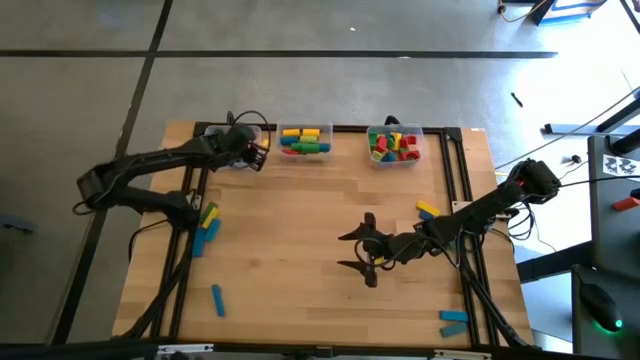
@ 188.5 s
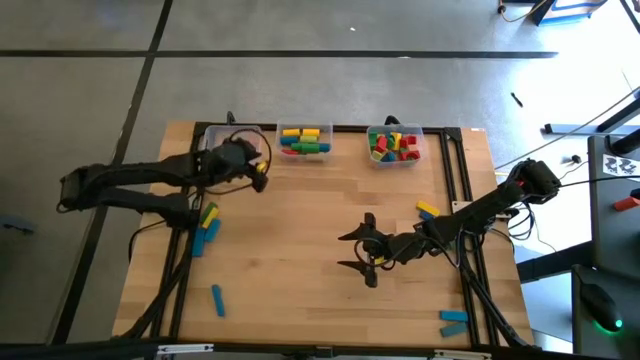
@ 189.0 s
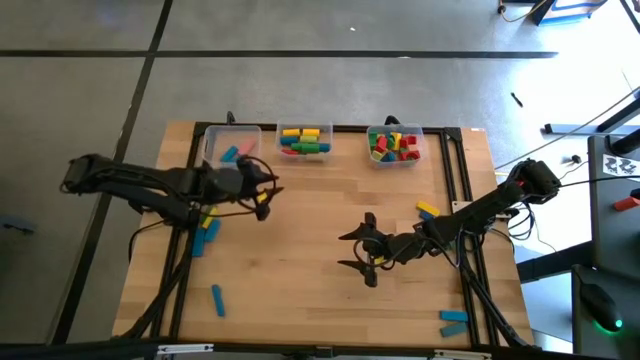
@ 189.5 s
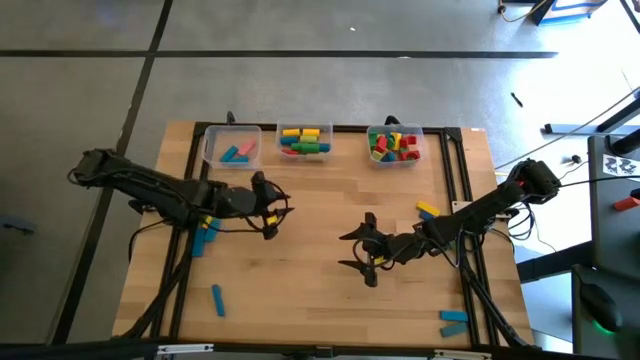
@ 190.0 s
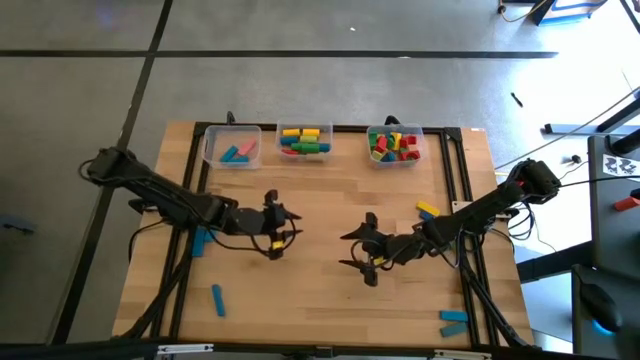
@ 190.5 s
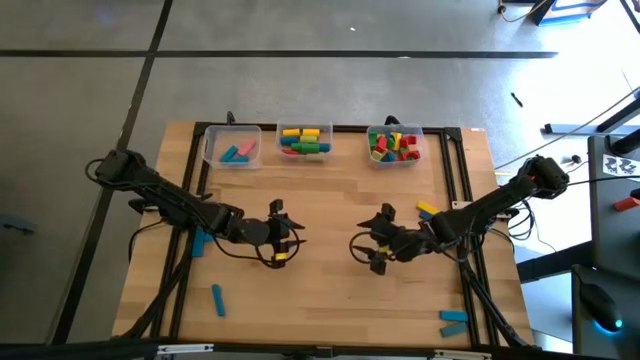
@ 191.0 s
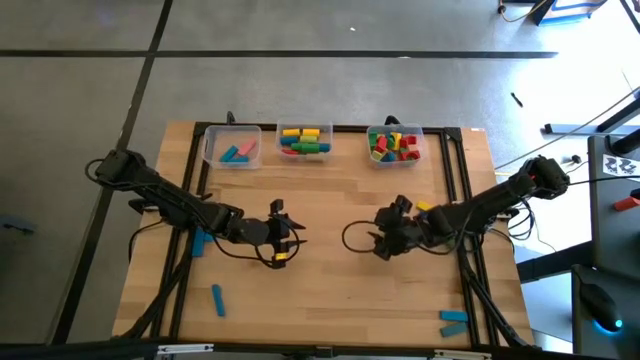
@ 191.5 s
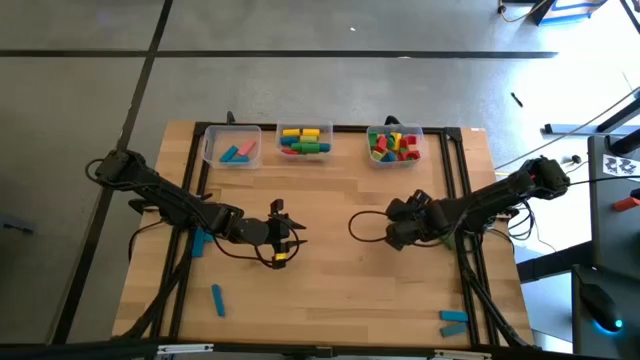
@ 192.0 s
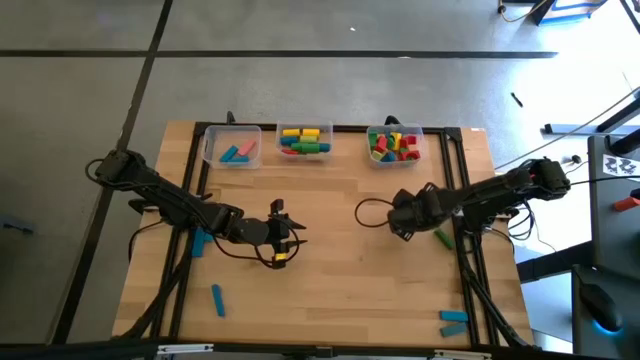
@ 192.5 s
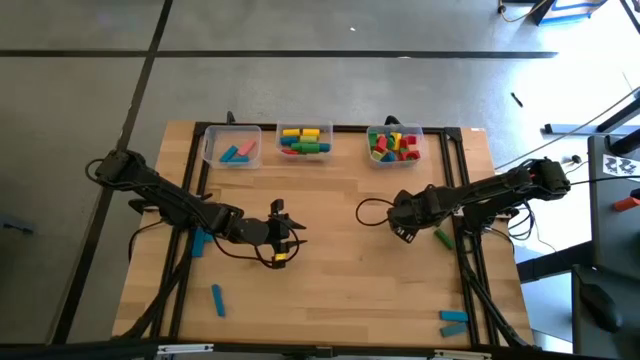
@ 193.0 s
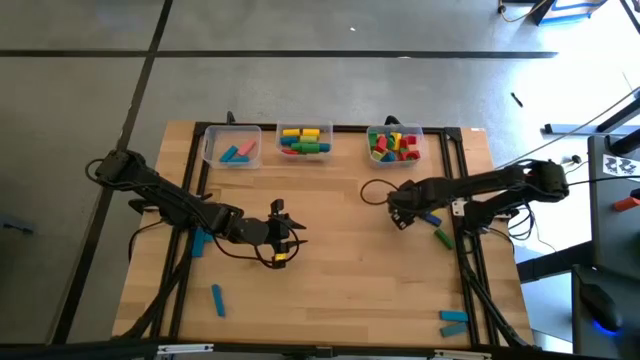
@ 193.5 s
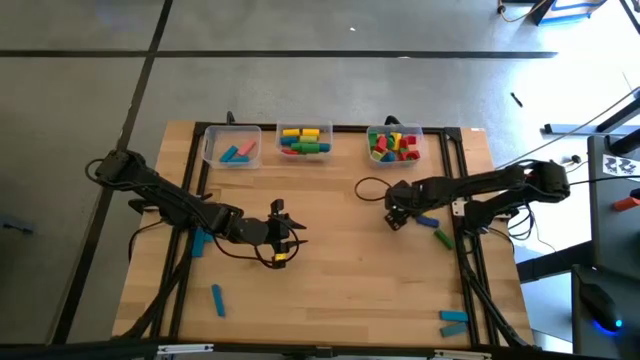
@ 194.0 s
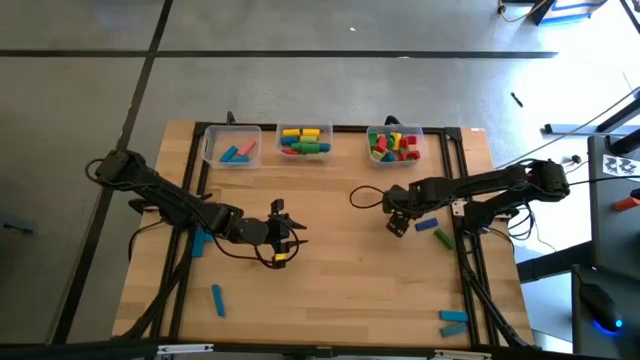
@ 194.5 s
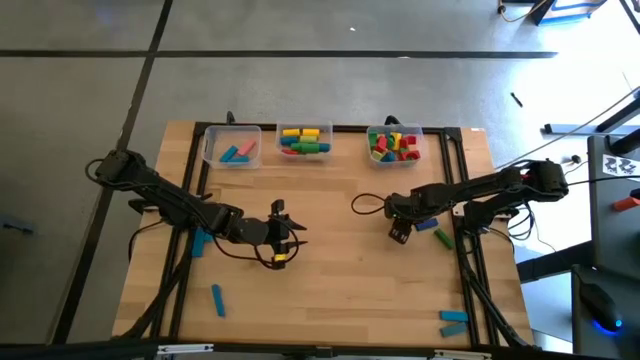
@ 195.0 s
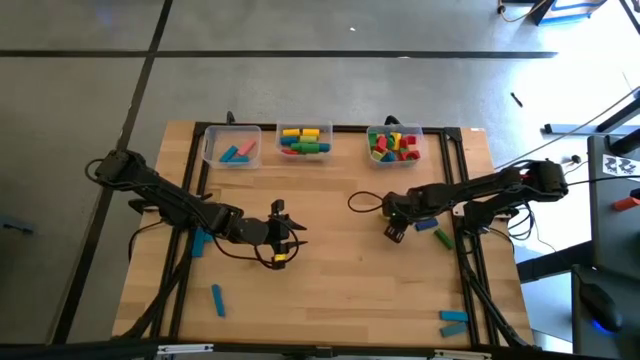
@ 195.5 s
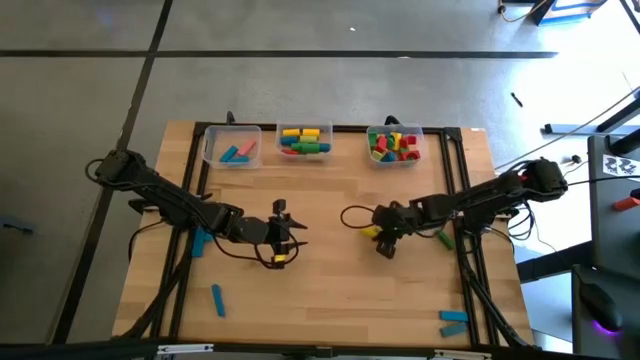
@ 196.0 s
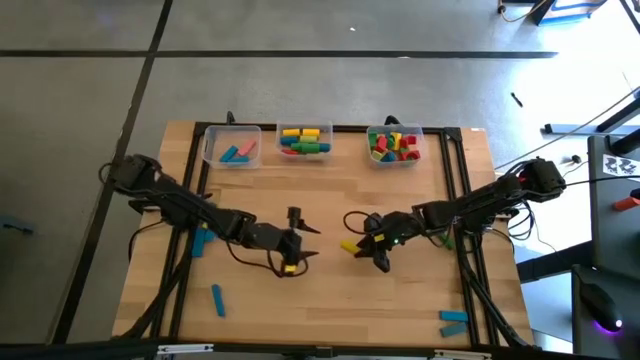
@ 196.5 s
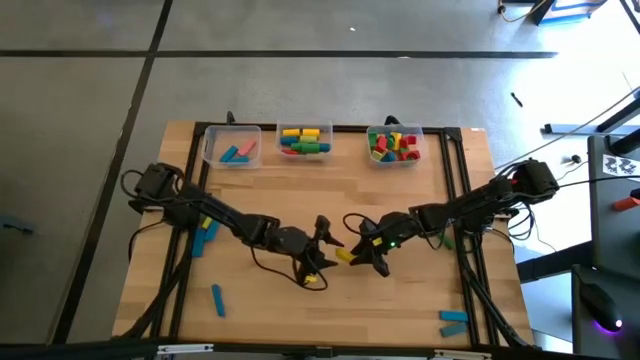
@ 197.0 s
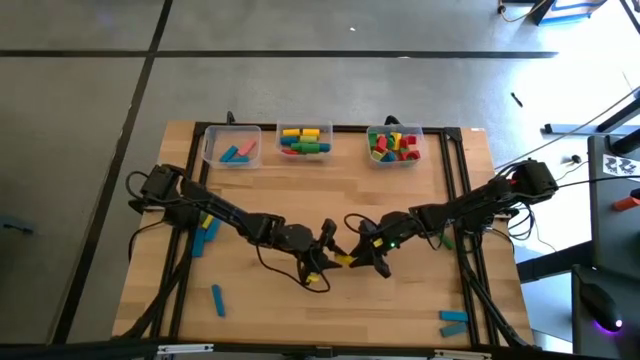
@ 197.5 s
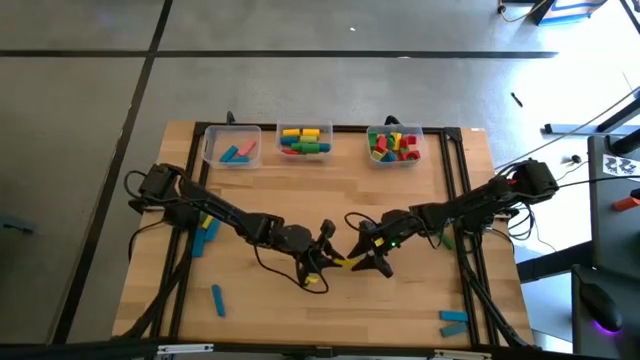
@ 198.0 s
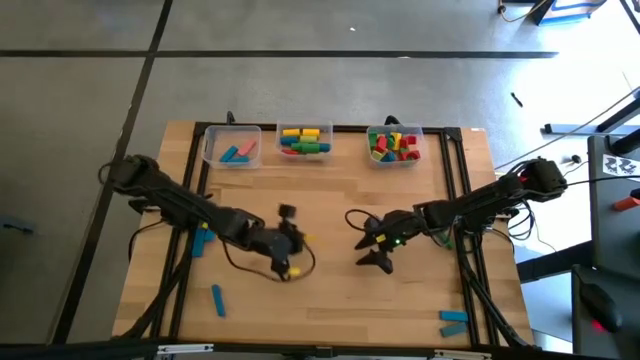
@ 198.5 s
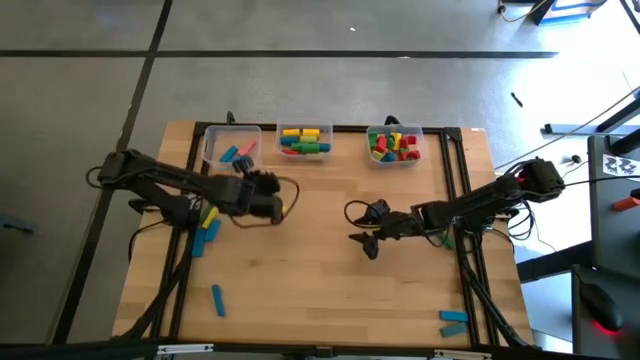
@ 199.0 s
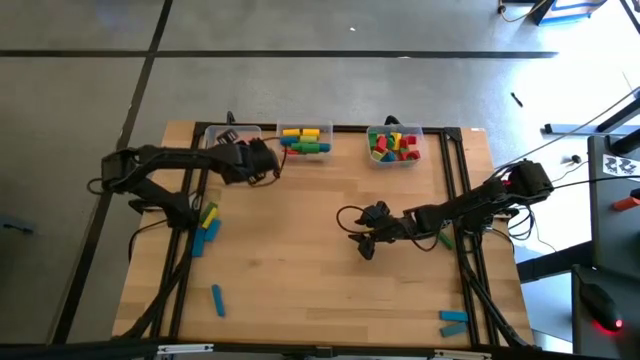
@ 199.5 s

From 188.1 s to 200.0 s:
Task: Sort blocks by size
Put the yellow rectangular block into the left transparent bin

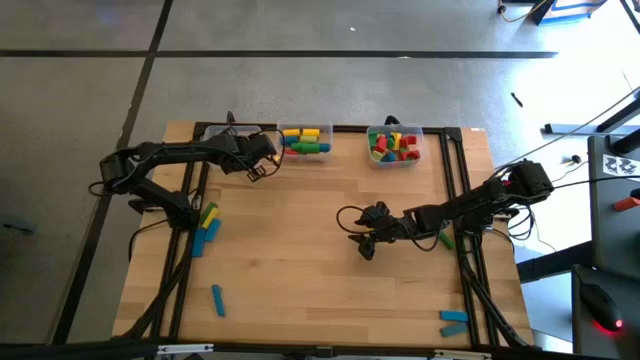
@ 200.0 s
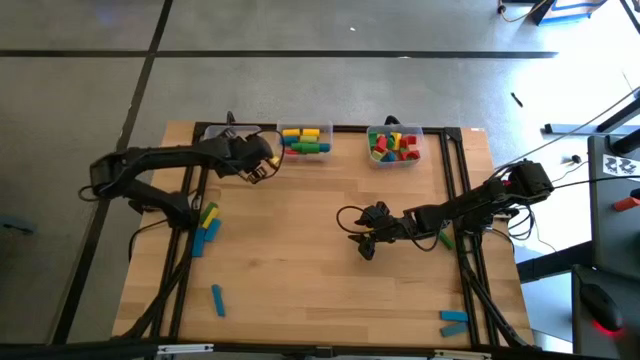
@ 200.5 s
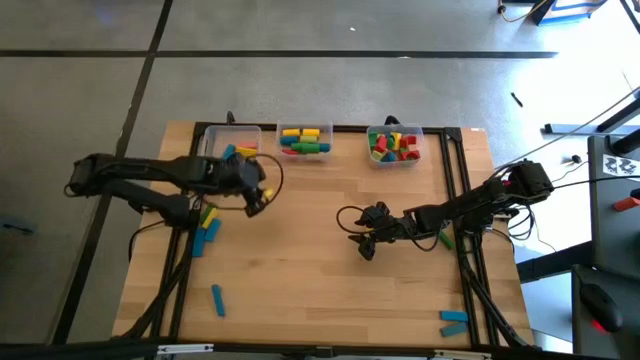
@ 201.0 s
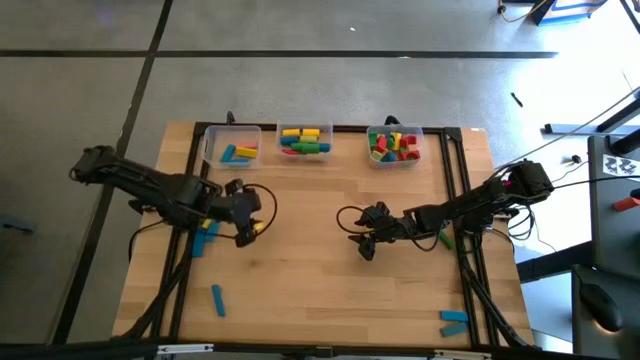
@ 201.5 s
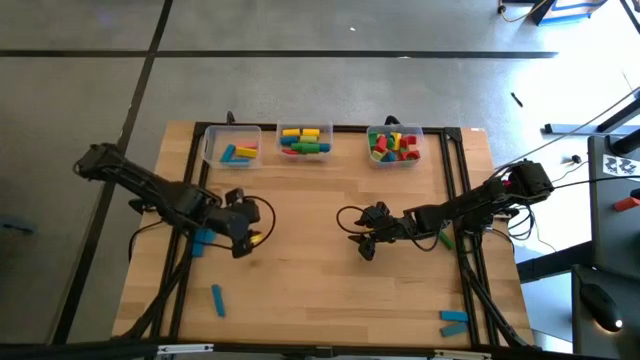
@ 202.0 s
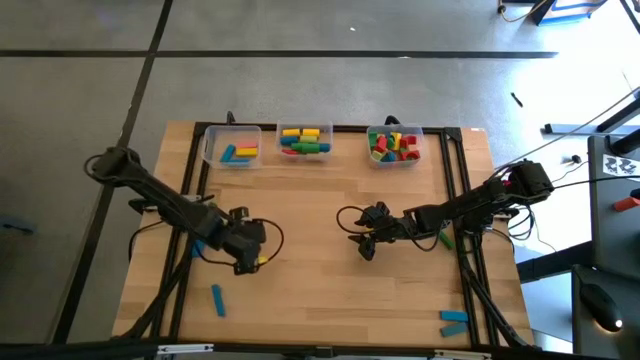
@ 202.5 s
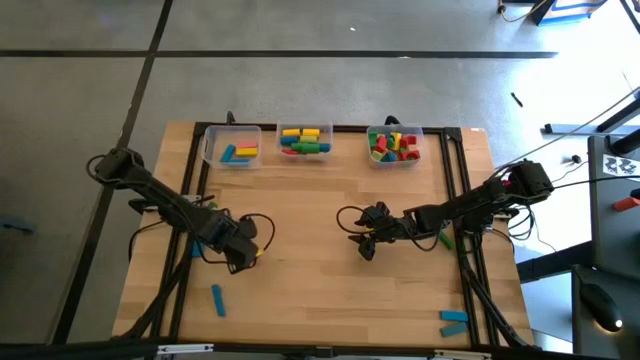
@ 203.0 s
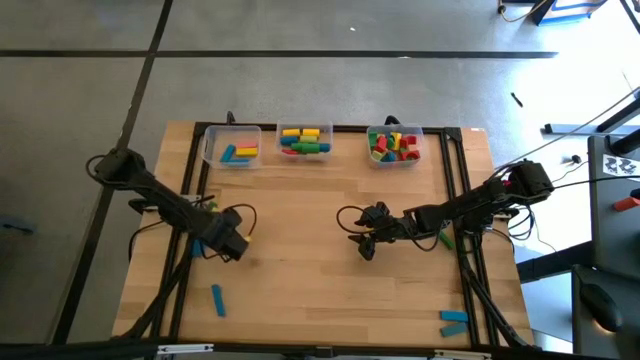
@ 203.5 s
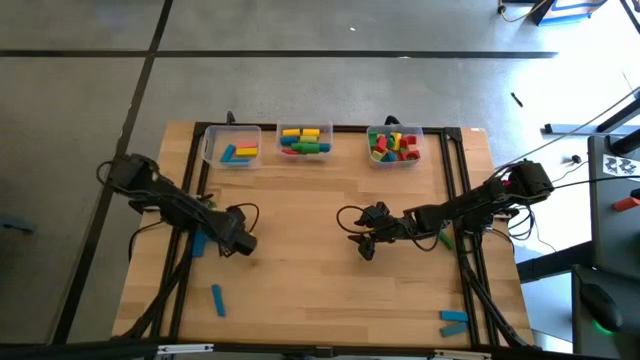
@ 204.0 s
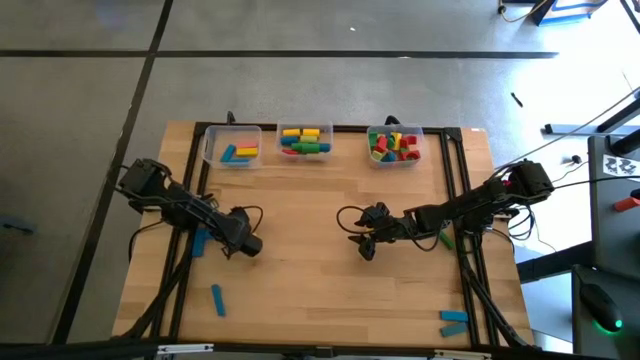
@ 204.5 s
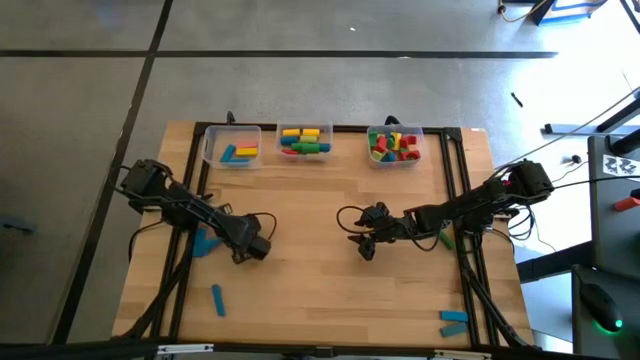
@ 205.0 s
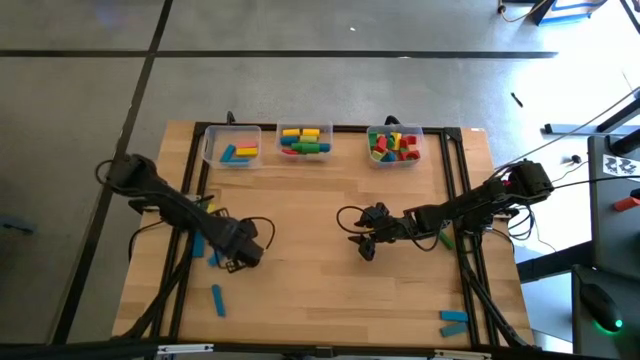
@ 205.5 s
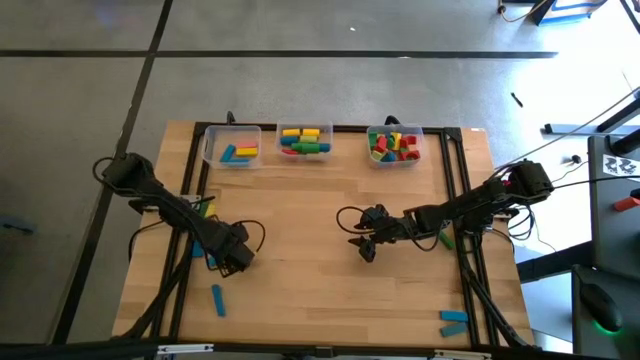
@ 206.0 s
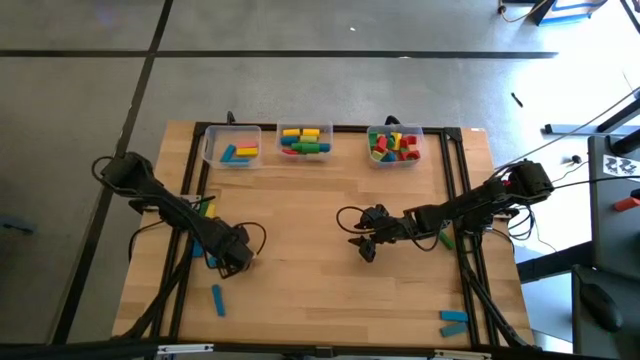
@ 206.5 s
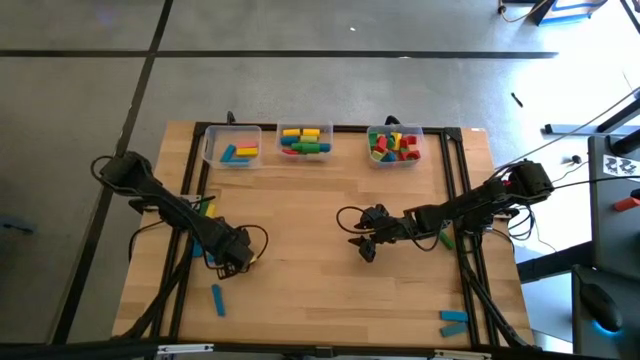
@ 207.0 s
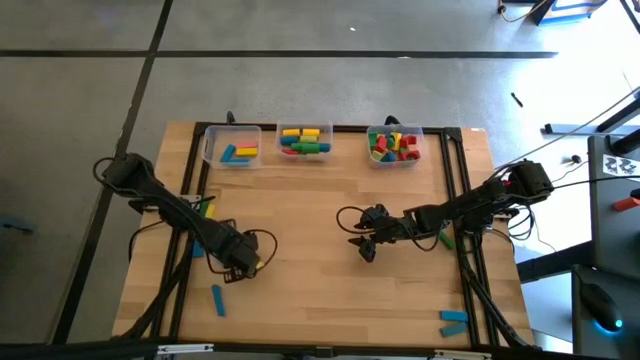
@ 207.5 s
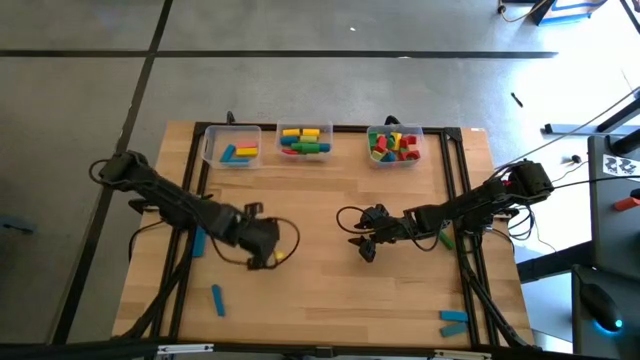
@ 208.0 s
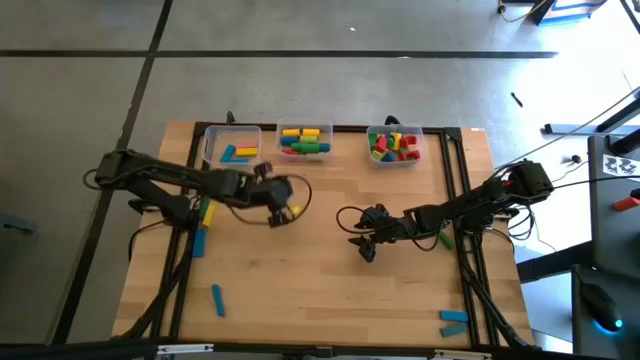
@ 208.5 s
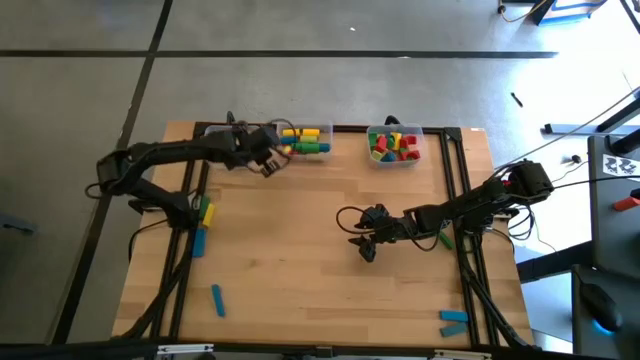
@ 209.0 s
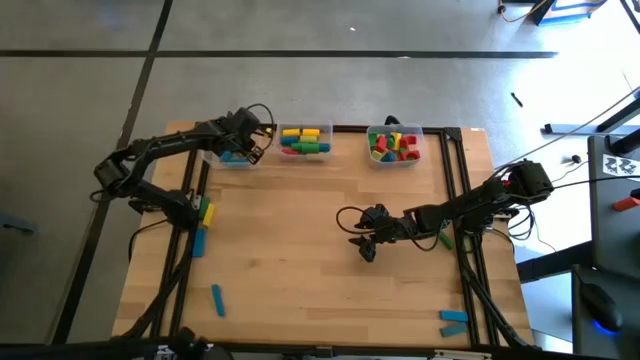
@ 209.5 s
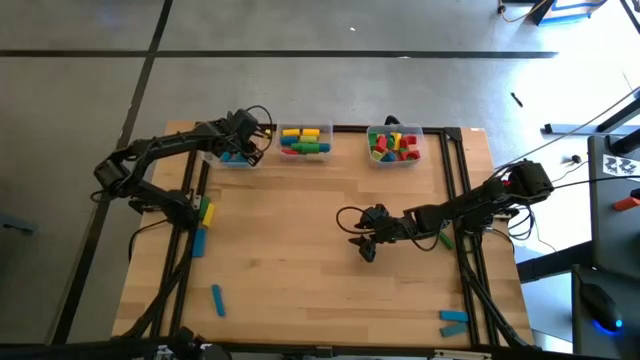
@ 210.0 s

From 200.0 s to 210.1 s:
Put the blue rectangular block into the left transparent bin
